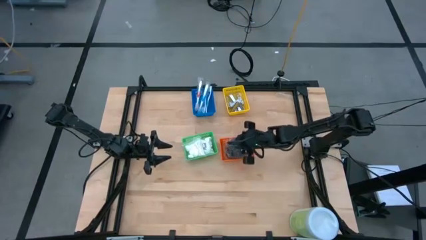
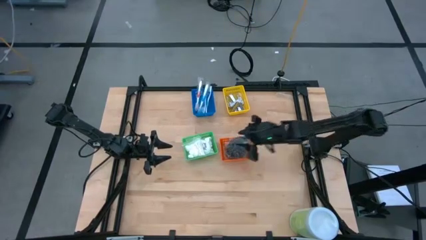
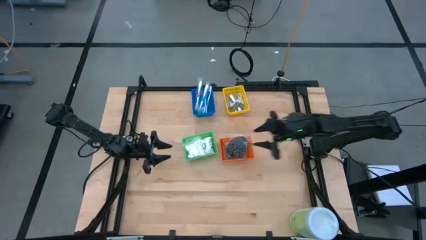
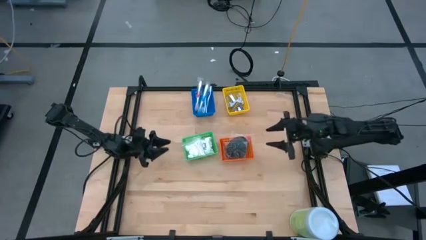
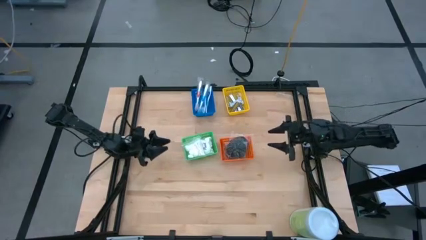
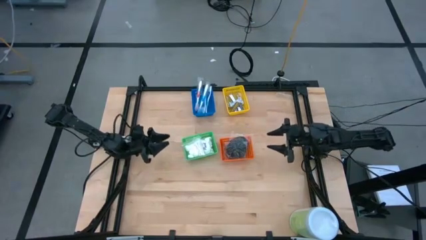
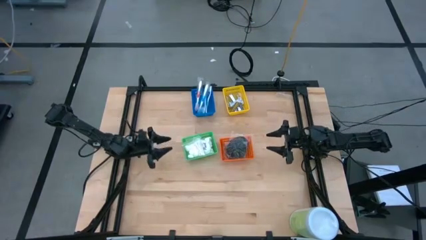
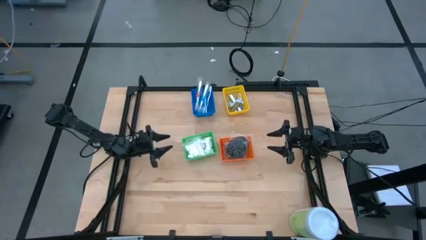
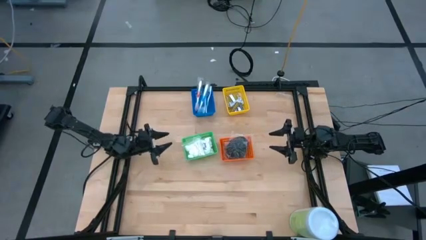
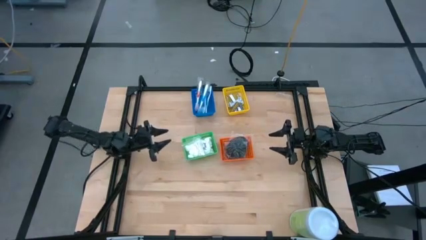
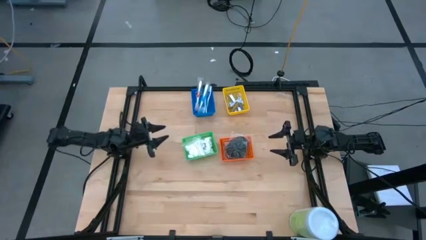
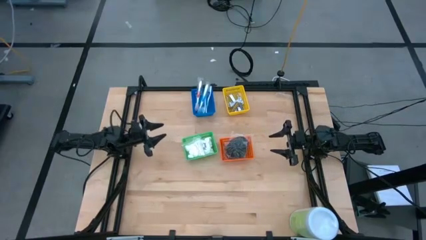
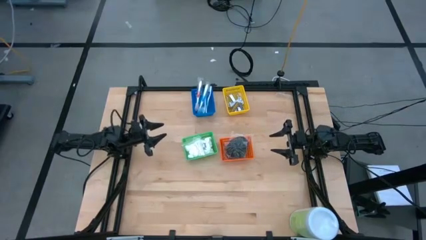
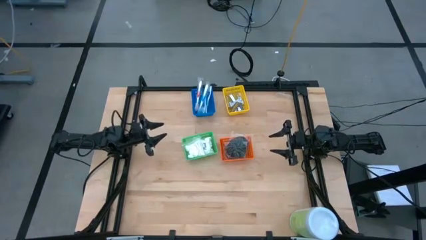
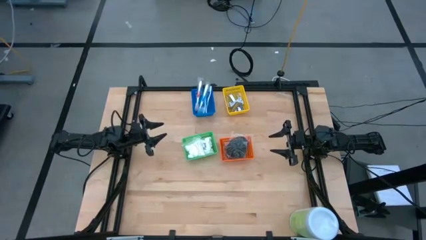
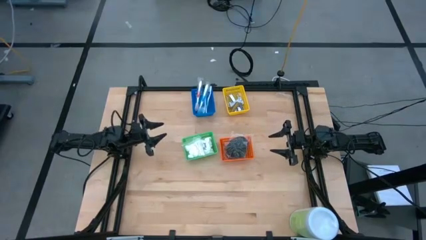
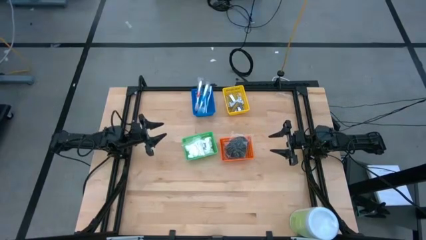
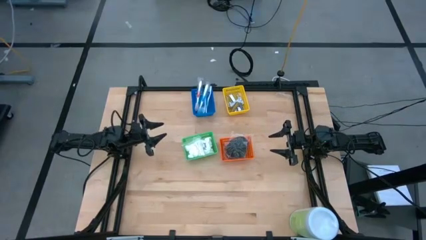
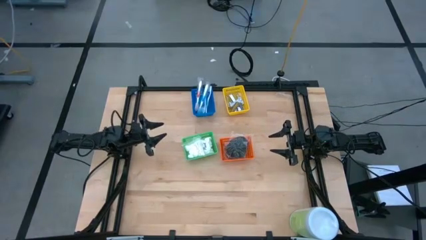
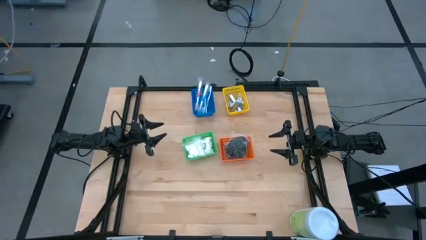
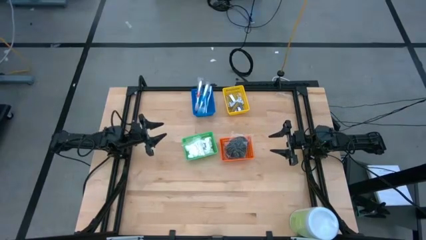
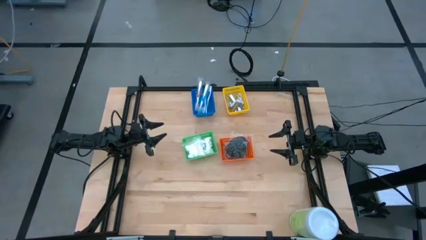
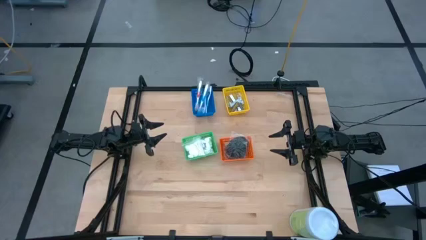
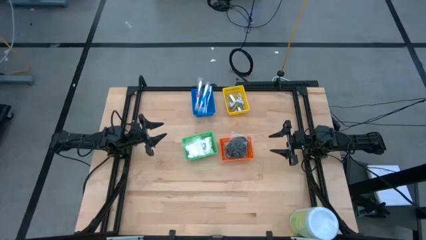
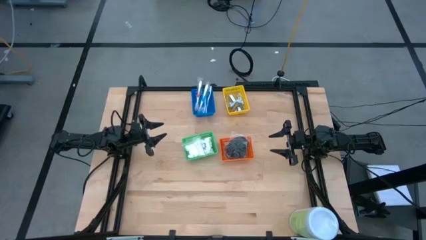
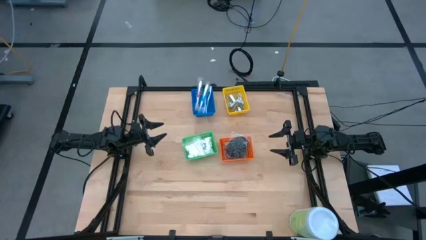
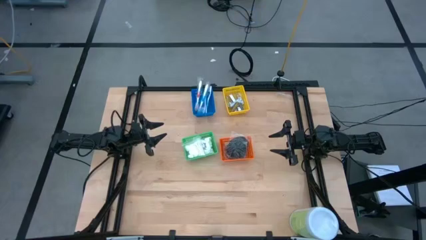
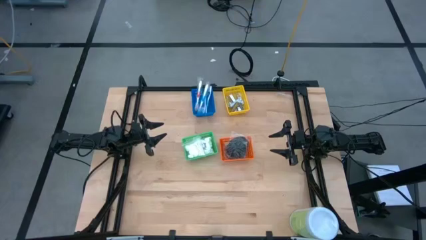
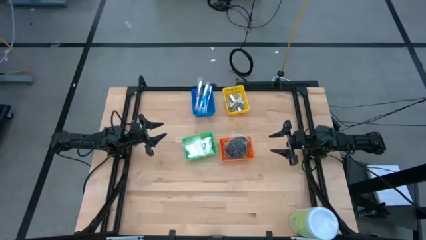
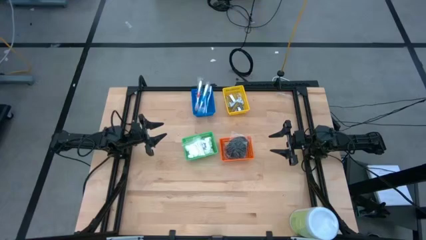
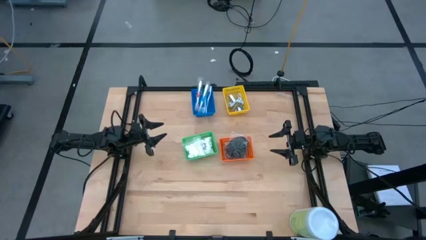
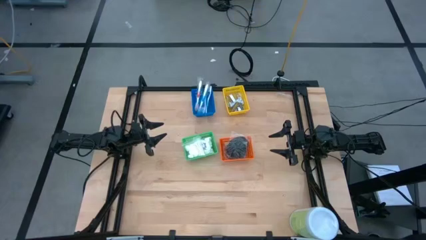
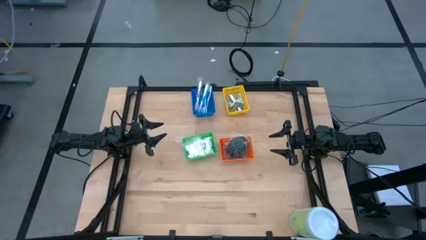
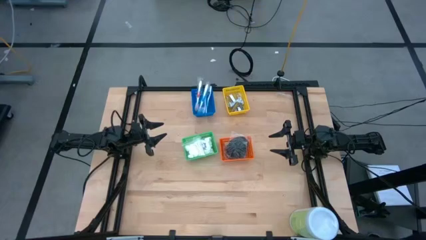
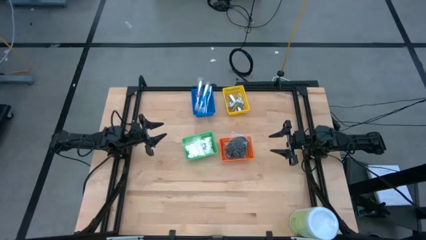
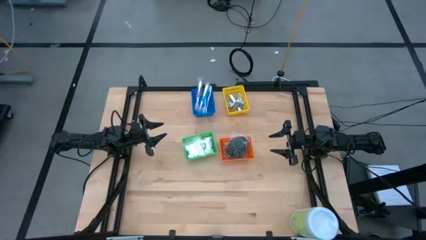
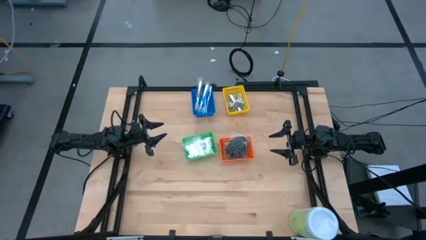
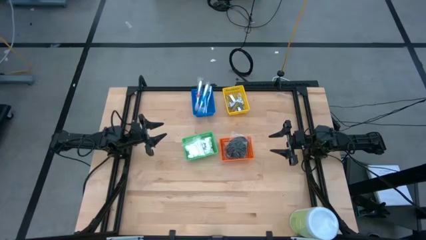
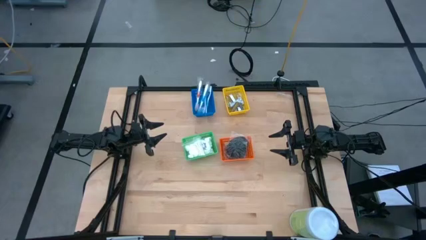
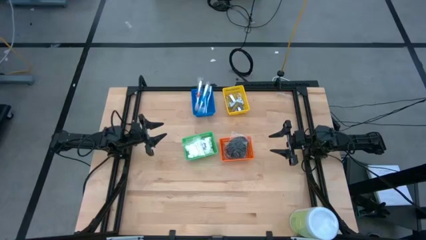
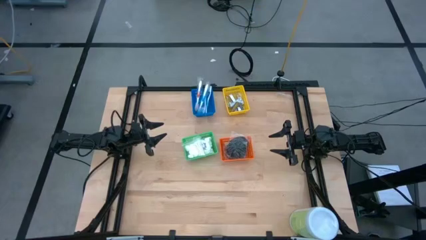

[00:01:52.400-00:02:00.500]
Task: Pick & Place Travel size toiletries
Return to Home Position

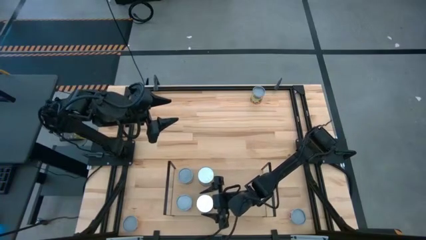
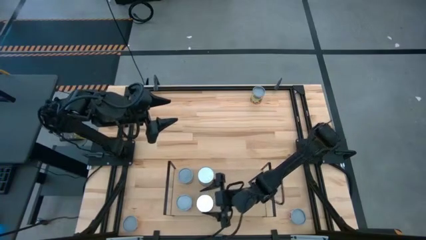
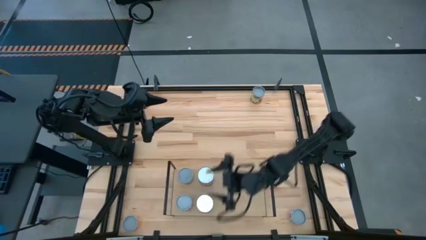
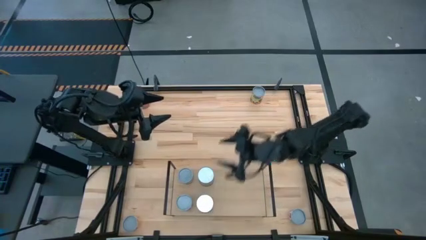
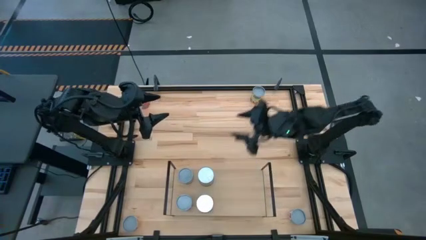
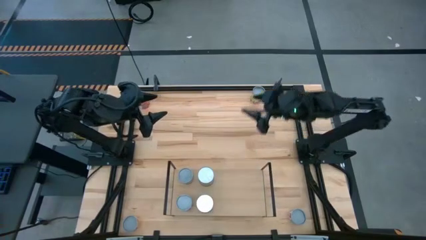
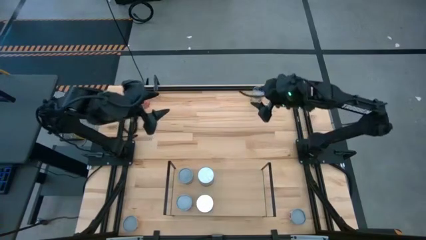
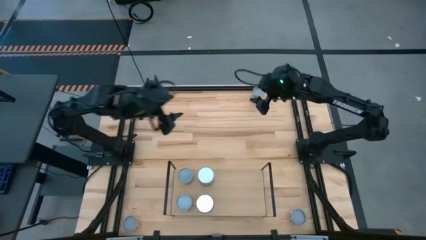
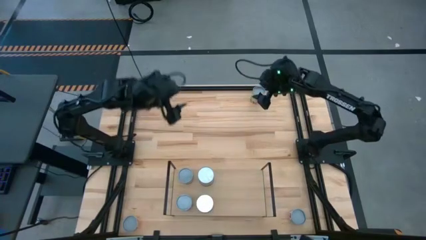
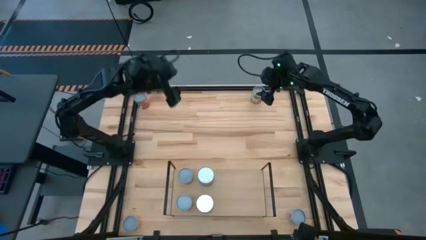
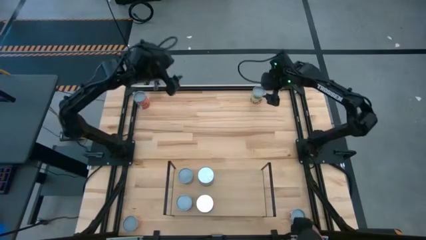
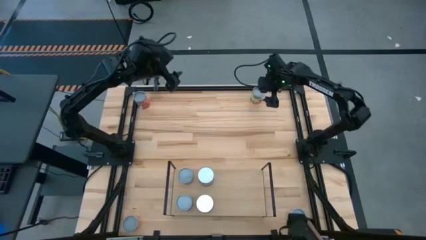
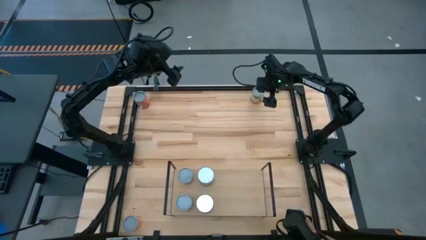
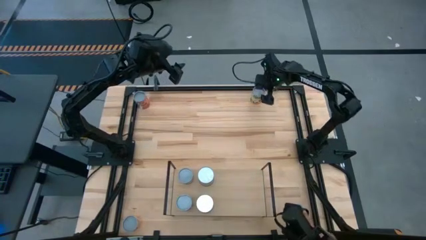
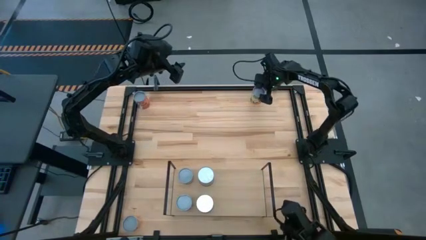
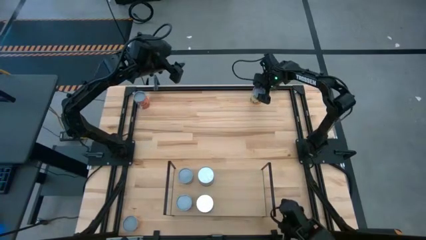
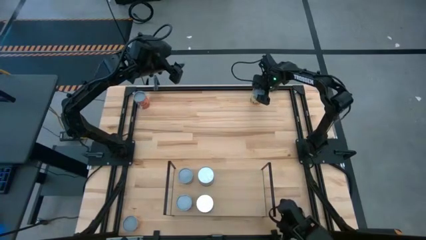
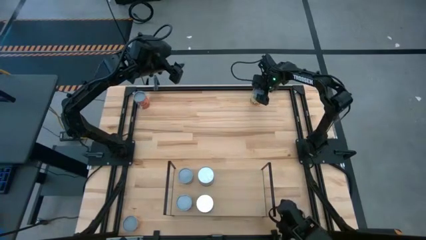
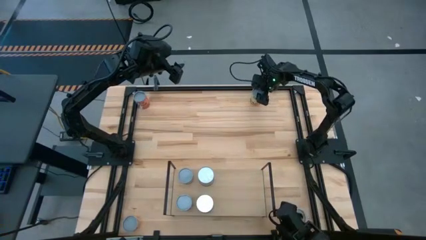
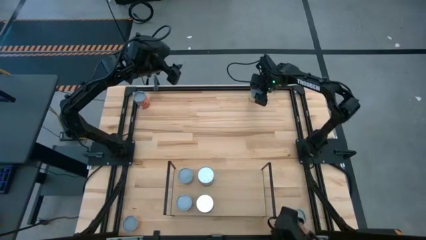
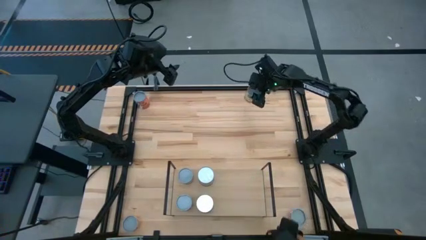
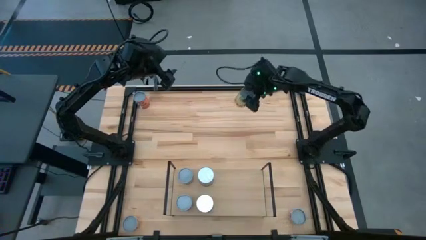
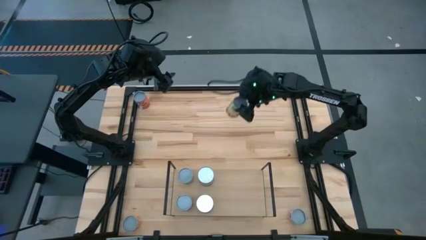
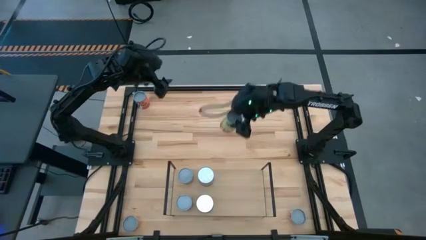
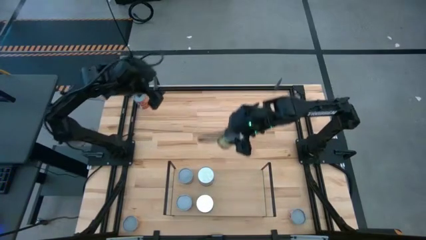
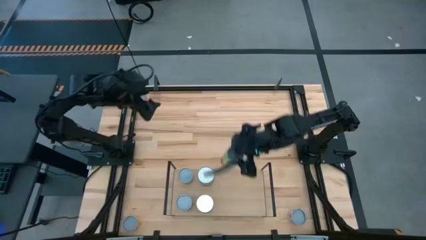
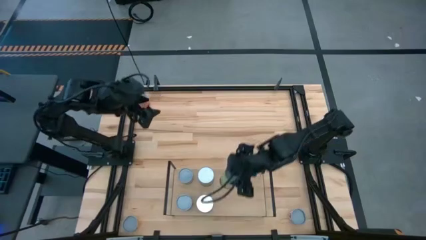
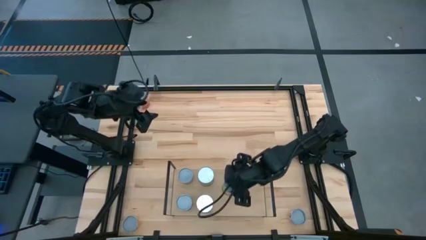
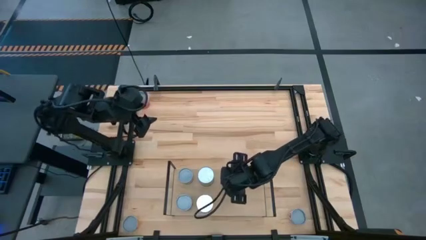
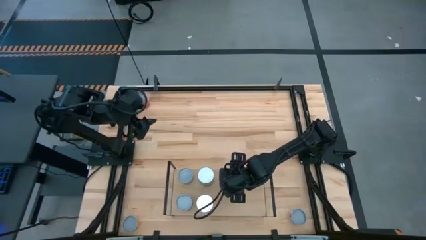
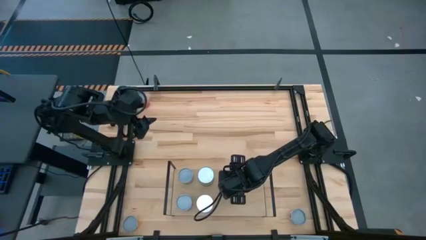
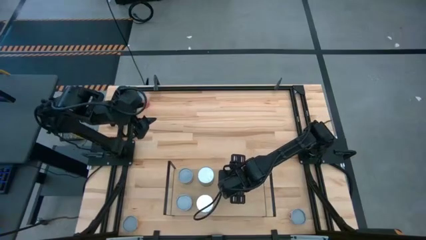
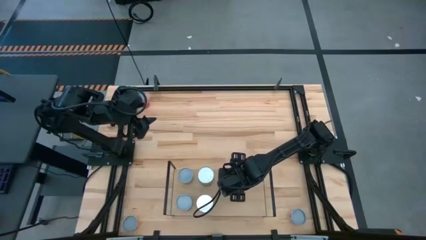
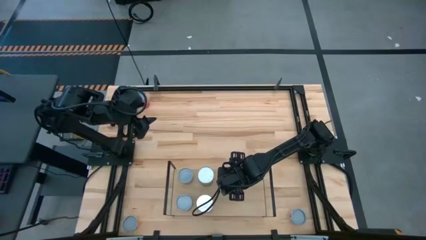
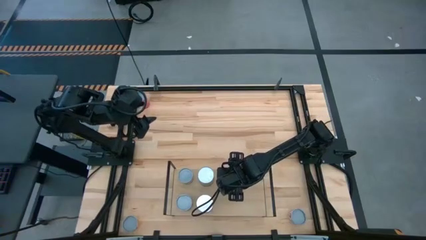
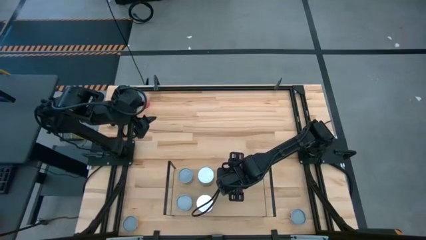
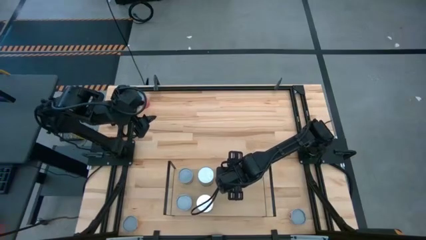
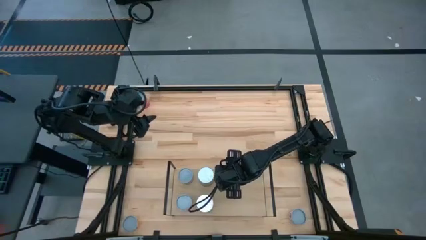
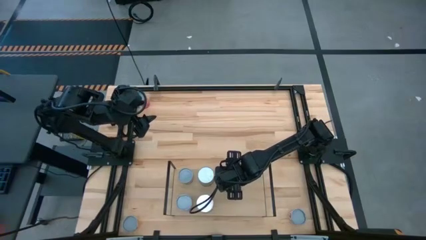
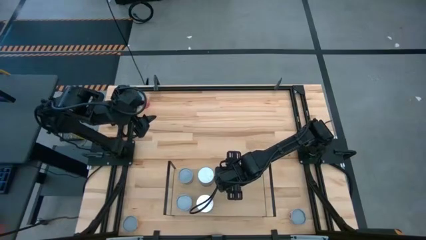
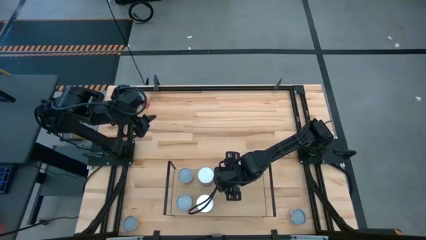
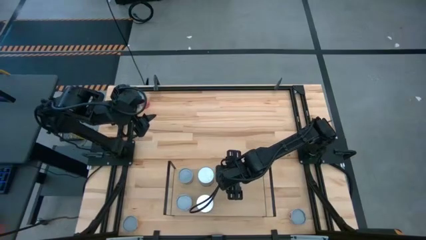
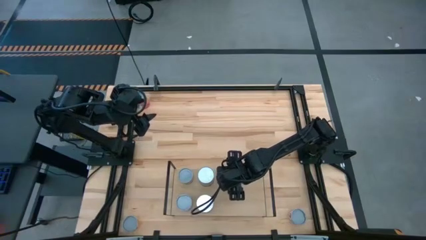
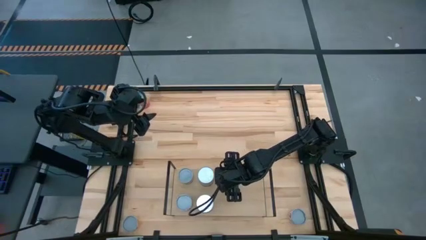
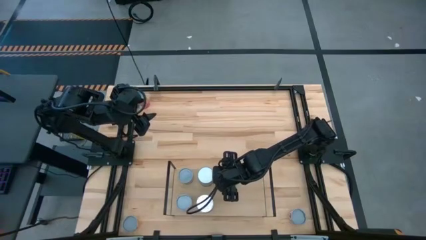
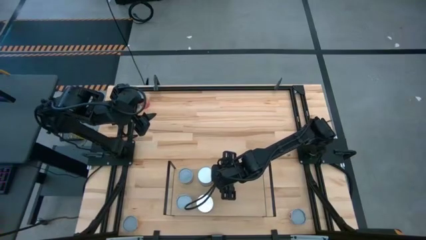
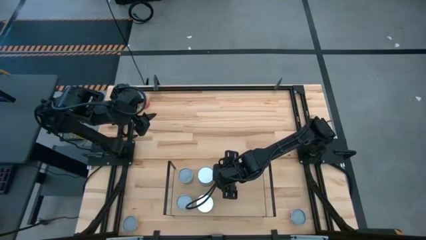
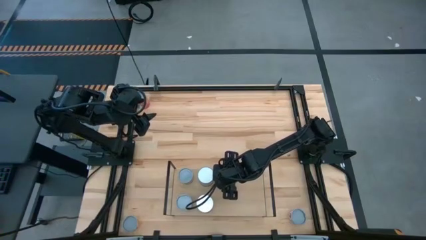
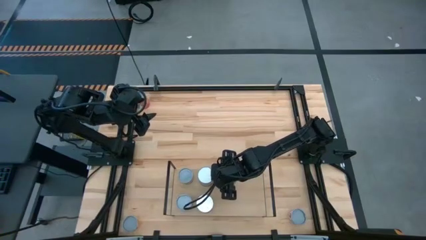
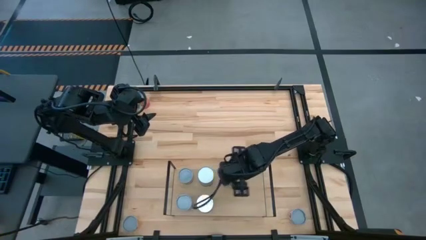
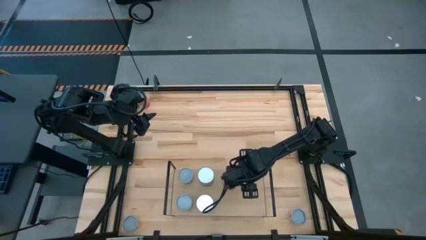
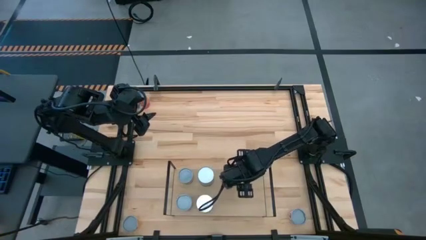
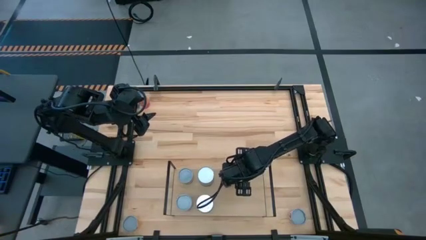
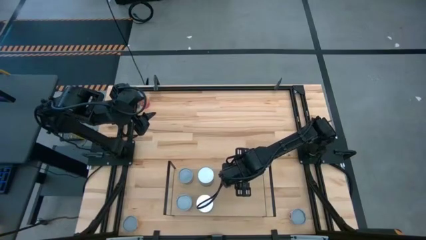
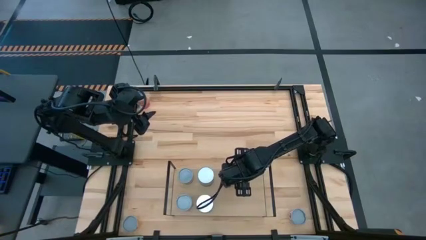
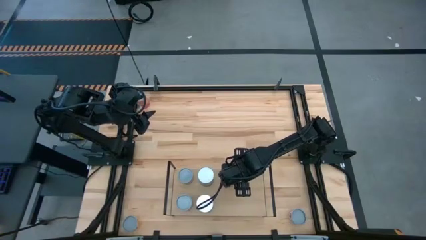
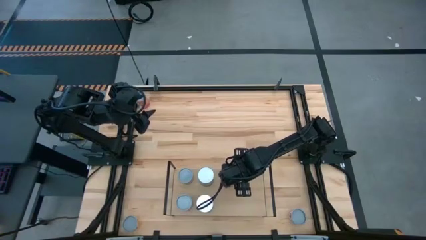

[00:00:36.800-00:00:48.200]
Task: Pick and place cans onto a shelf
Put the canned spaghetti sauce on the shelf
